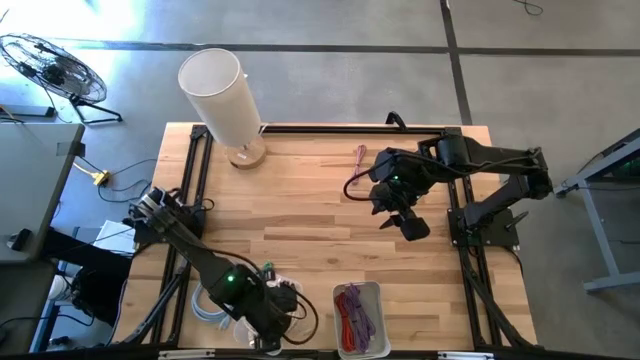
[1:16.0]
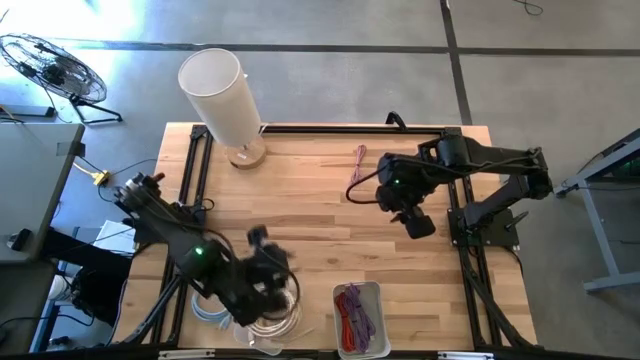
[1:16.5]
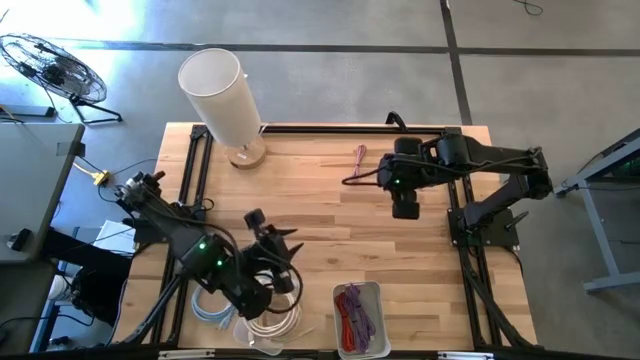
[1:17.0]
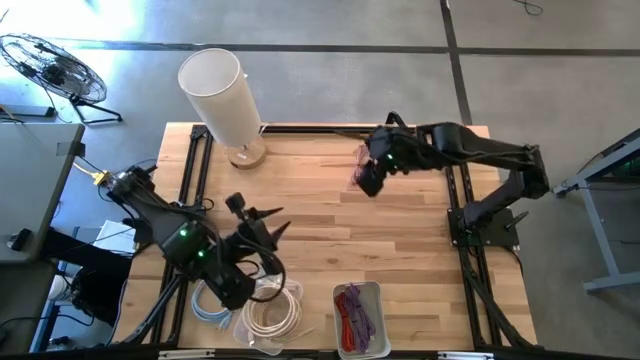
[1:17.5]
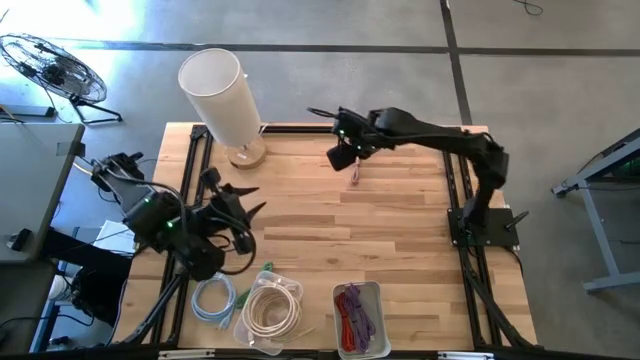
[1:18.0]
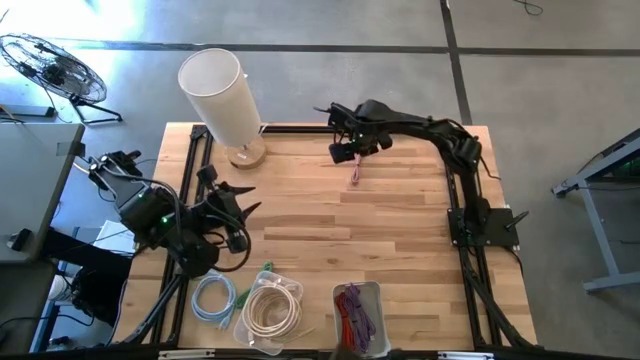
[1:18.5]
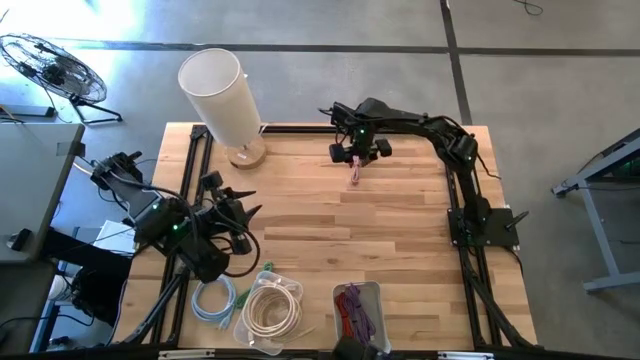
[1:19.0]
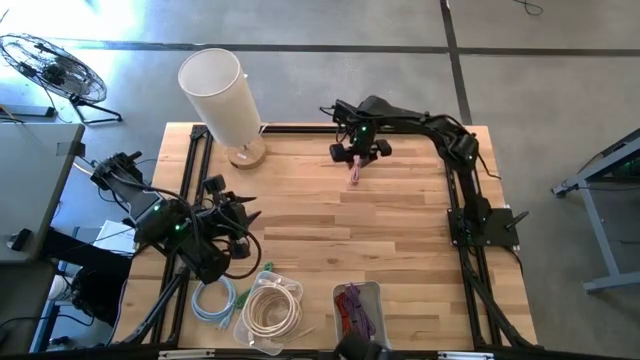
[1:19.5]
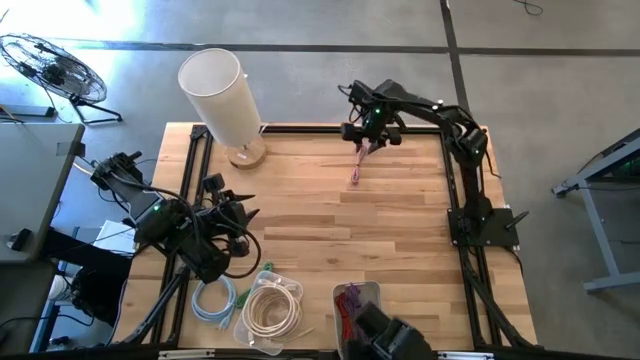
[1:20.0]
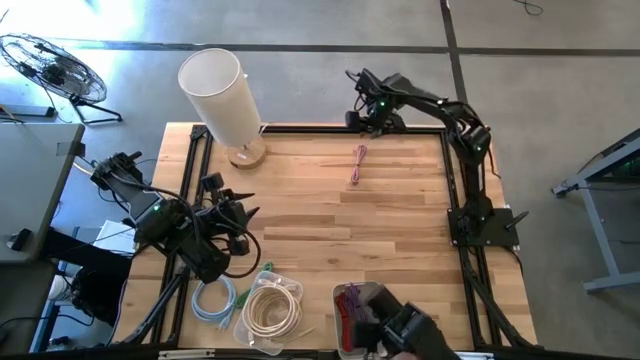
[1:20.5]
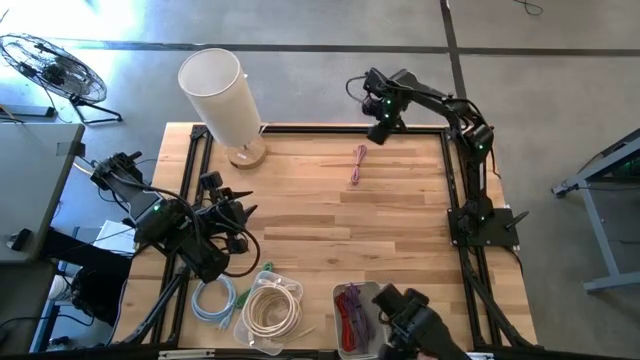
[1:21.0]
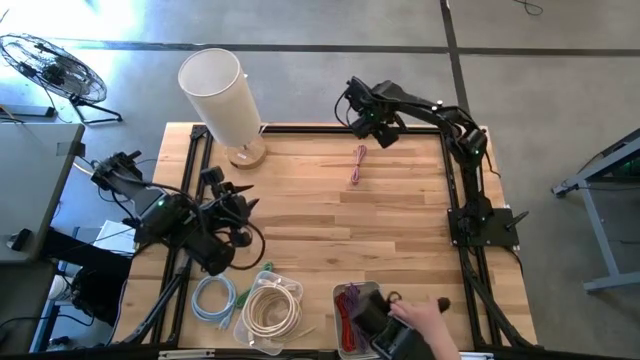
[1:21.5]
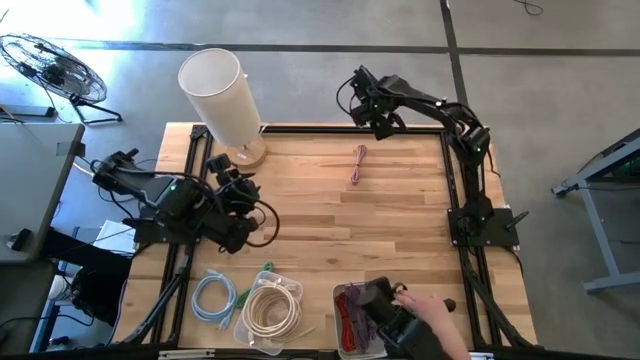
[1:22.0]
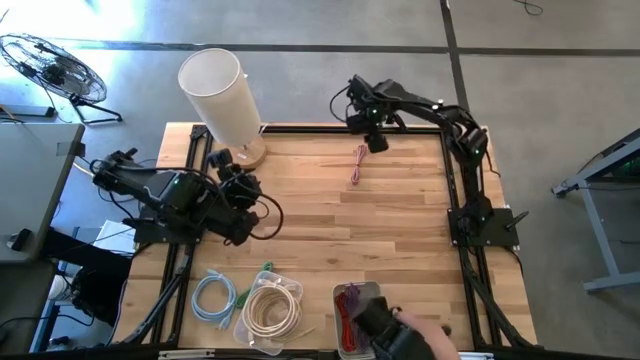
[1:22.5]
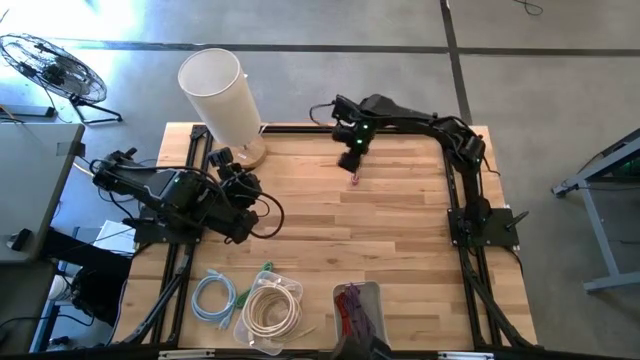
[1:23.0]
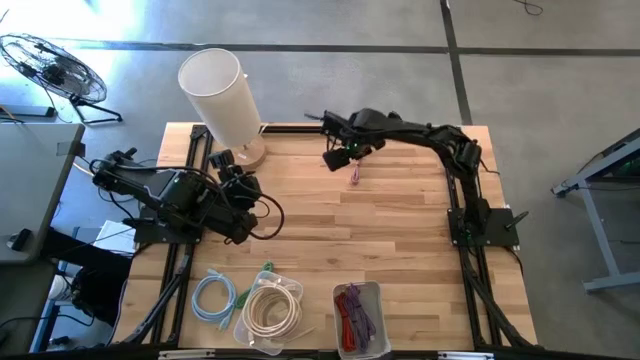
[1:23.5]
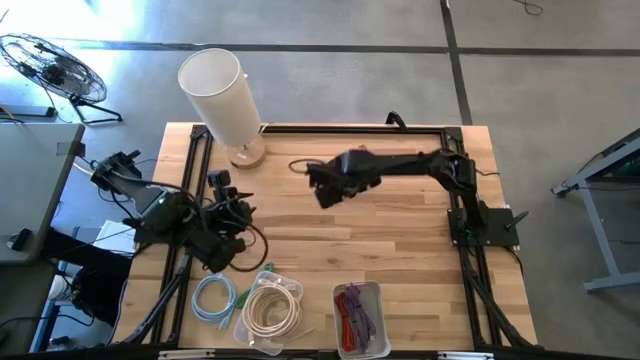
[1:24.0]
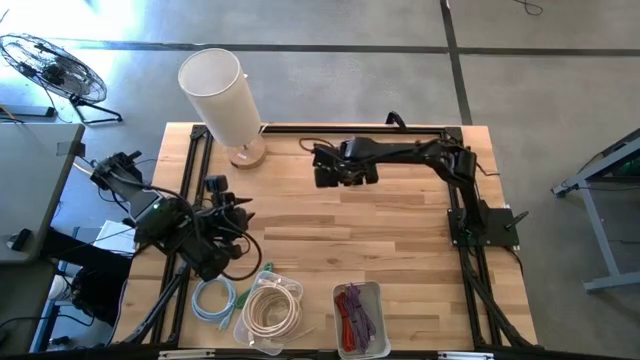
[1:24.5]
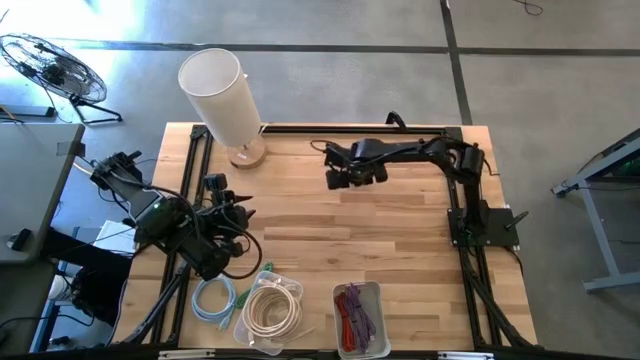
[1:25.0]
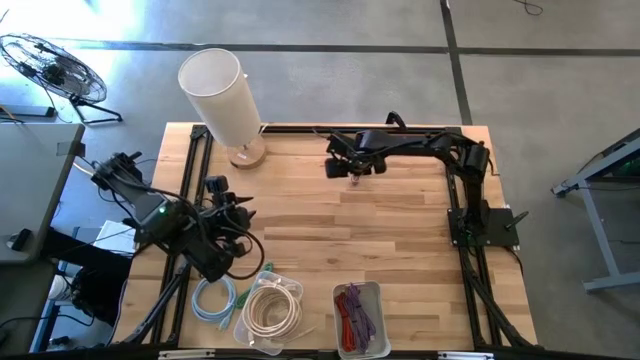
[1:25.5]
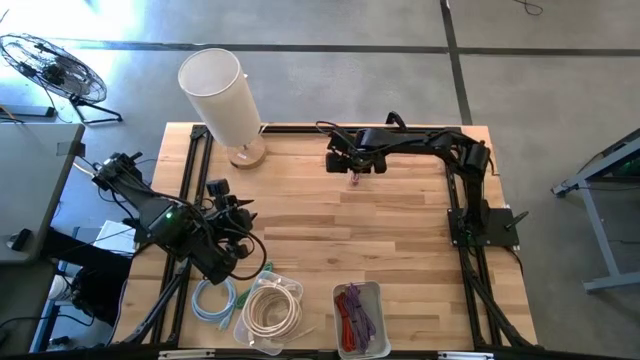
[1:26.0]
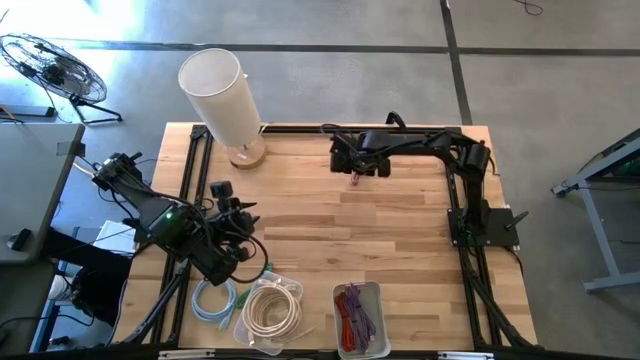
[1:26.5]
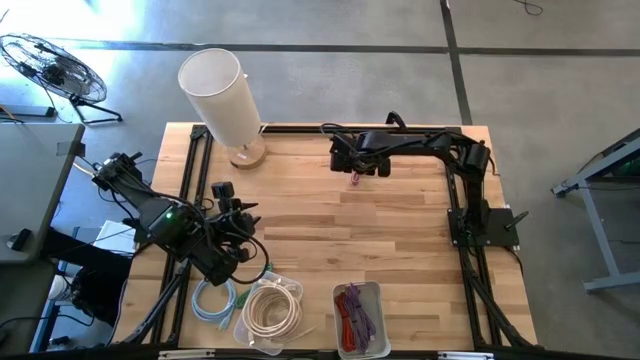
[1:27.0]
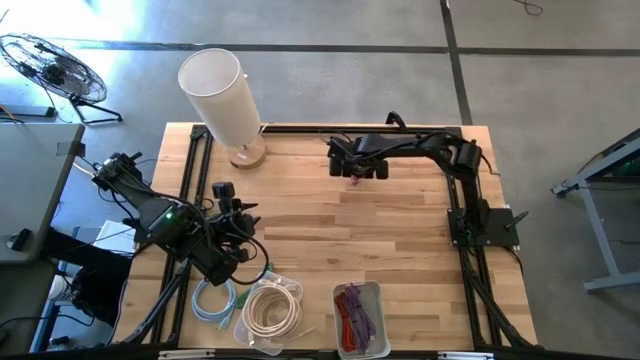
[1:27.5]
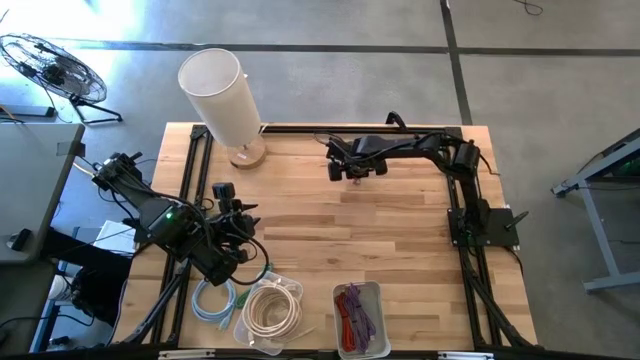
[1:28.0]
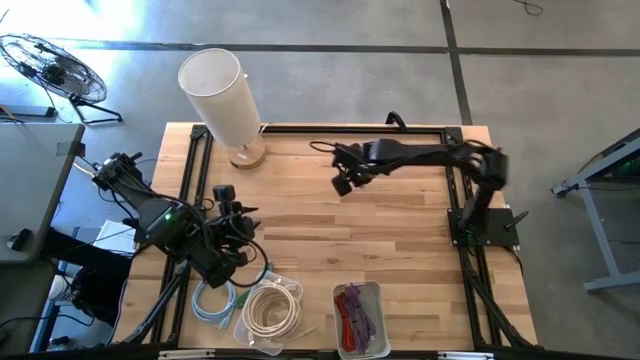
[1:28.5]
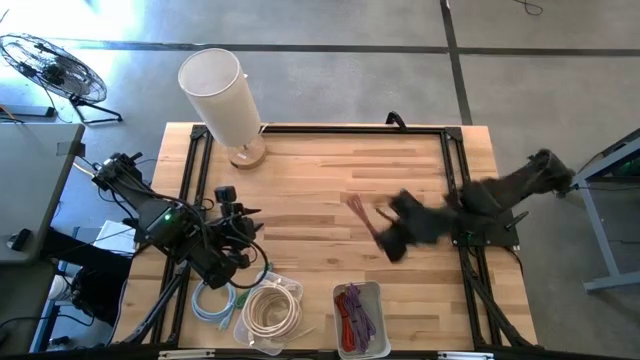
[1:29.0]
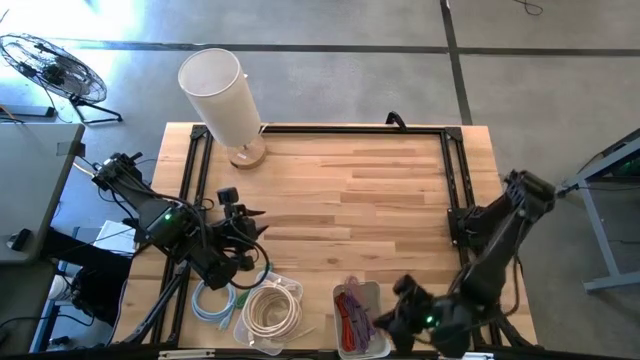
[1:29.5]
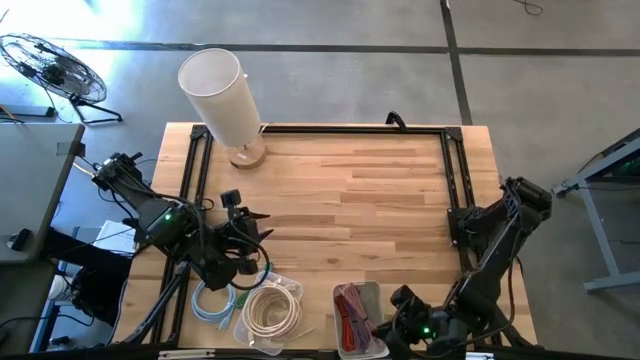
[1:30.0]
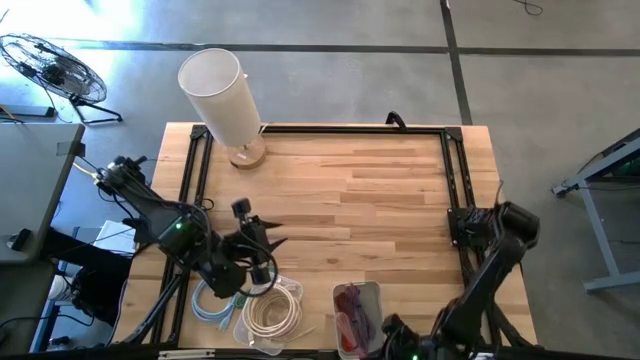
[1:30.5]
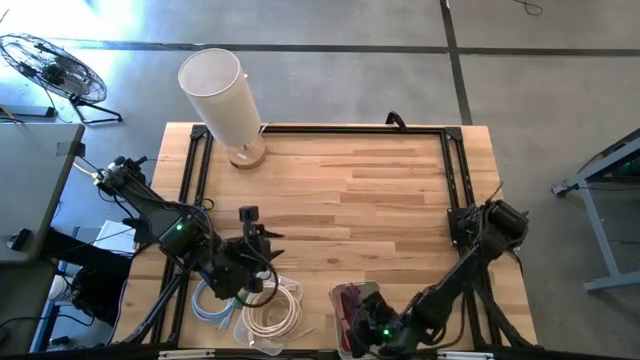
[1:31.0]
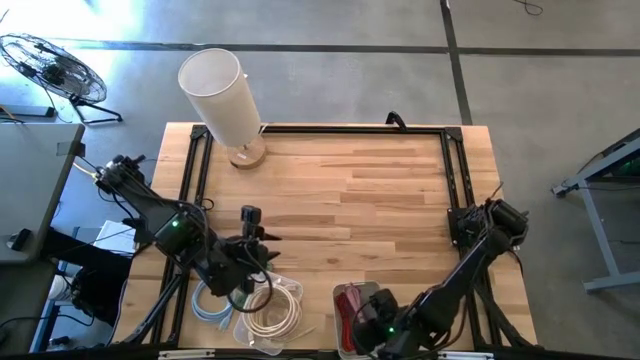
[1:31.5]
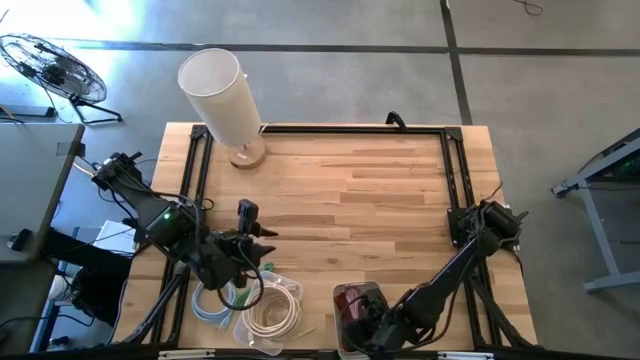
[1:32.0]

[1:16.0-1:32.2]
Task: Pick & Place USB Port
Put the pink USB cable into the gray bin

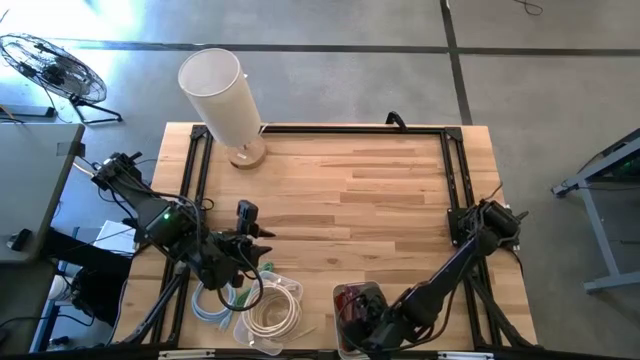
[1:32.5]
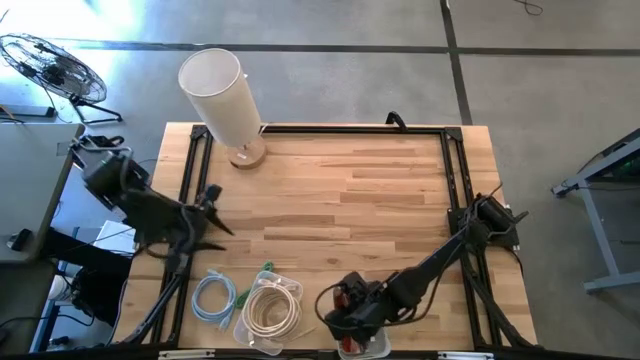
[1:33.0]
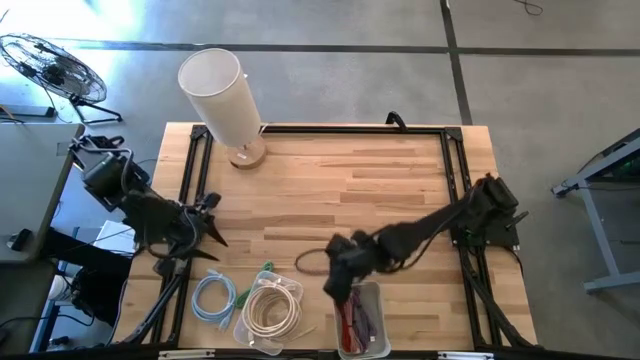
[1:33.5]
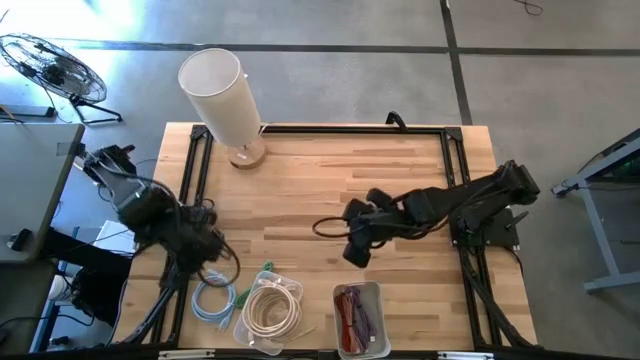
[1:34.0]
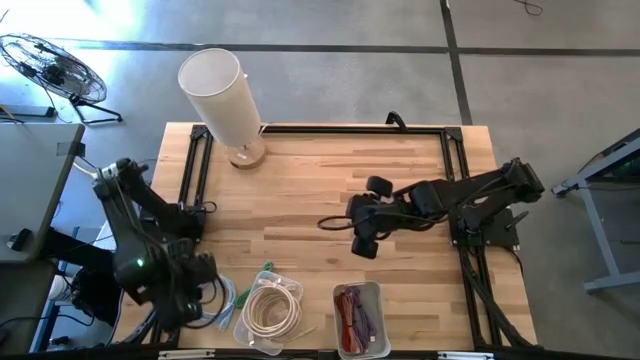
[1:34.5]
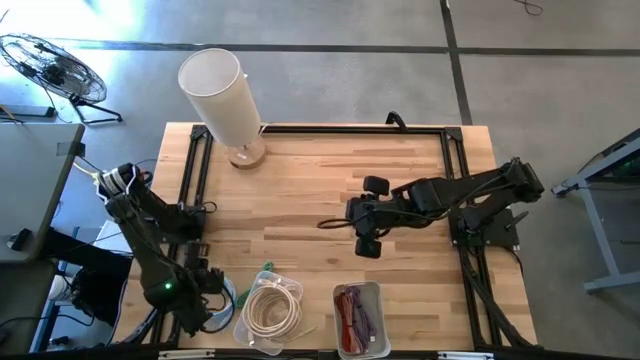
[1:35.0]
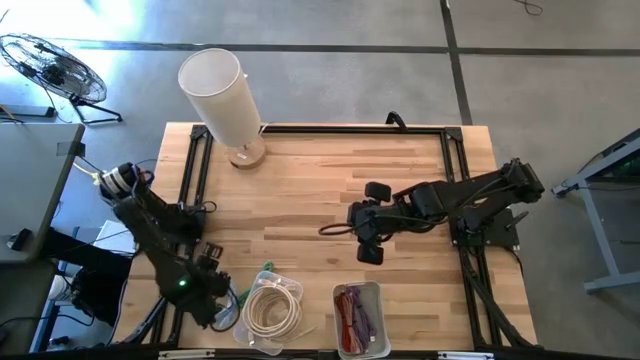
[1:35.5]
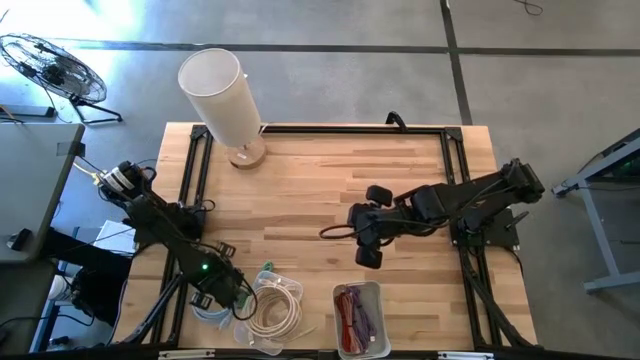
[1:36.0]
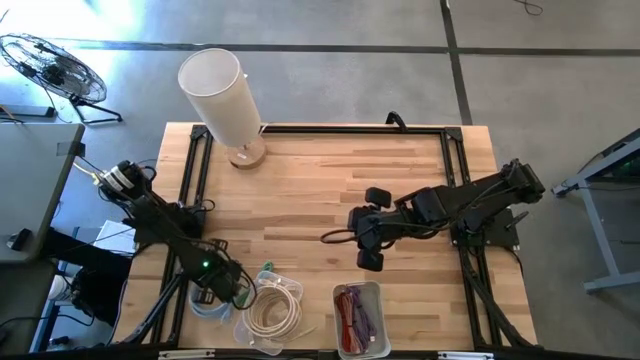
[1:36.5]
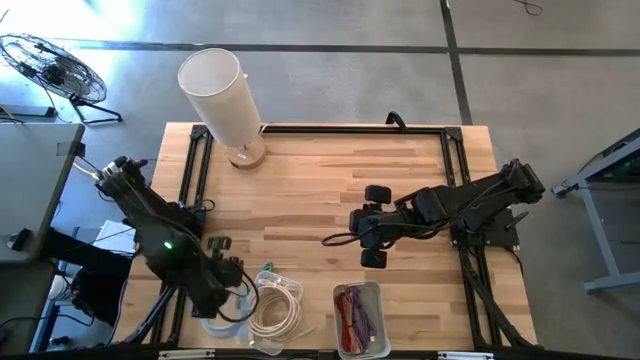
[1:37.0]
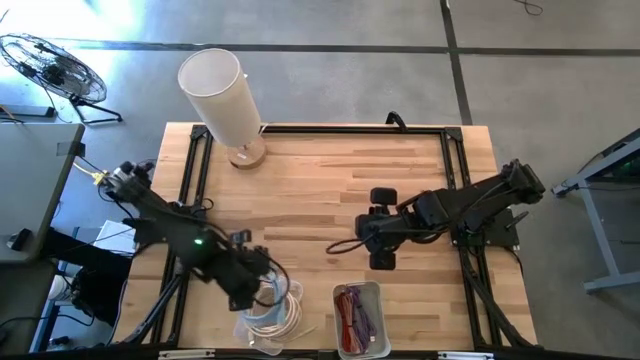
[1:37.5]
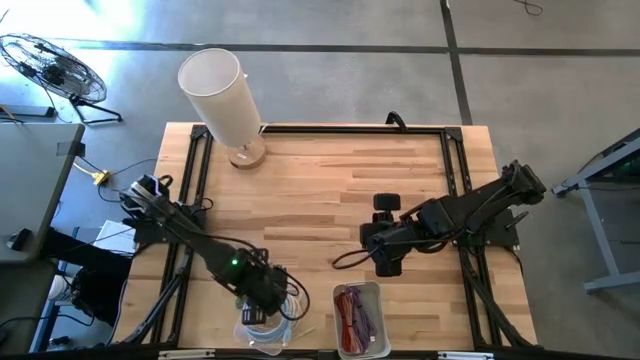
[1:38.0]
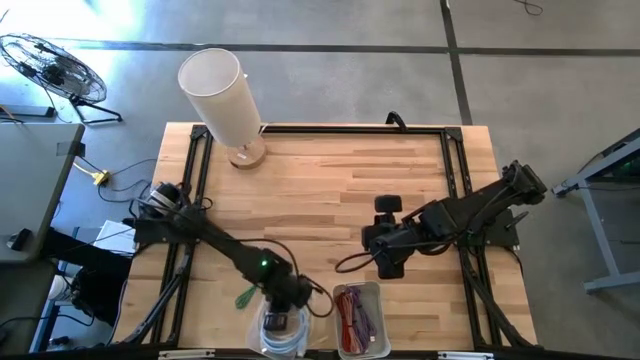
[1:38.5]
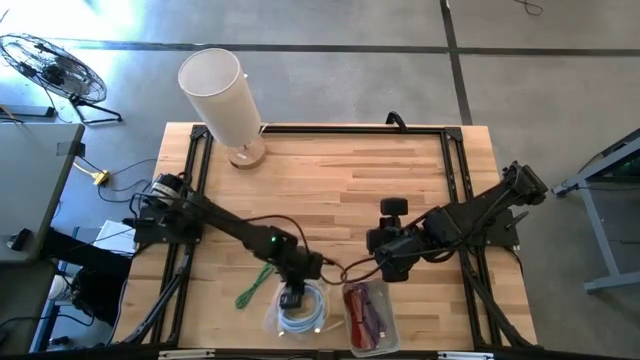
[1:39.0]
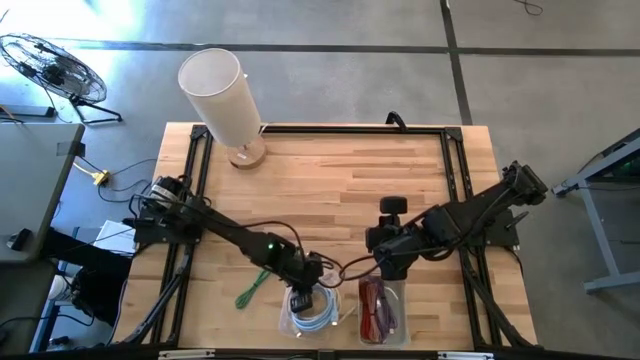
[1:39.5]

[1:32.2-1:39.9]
Put the blue HDMI cable into the transparent bin
